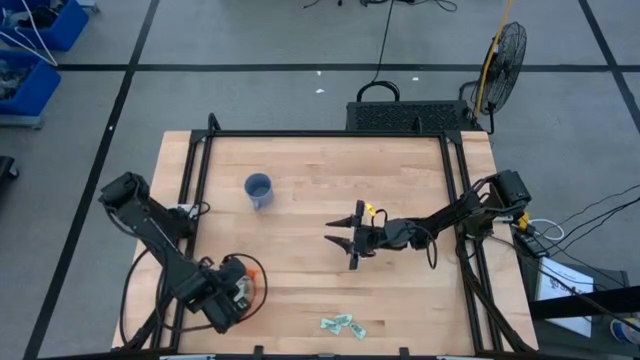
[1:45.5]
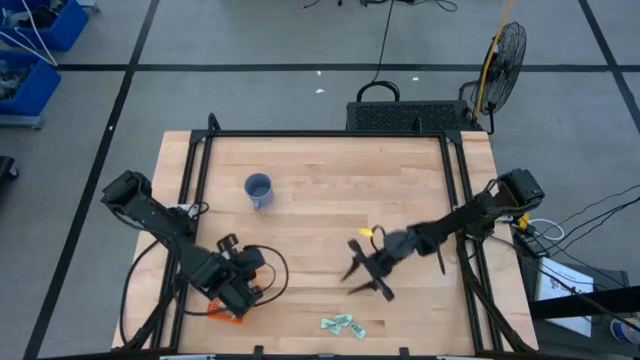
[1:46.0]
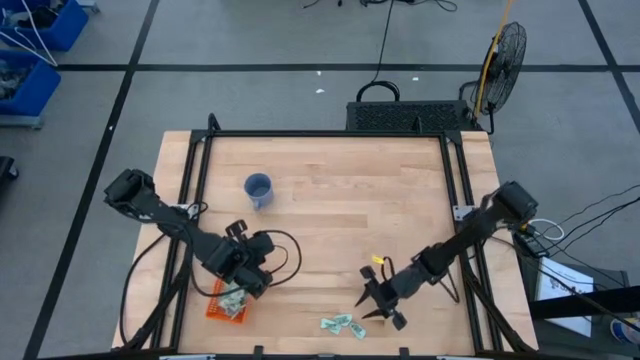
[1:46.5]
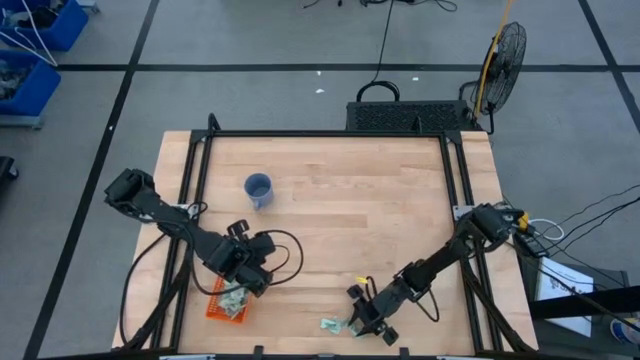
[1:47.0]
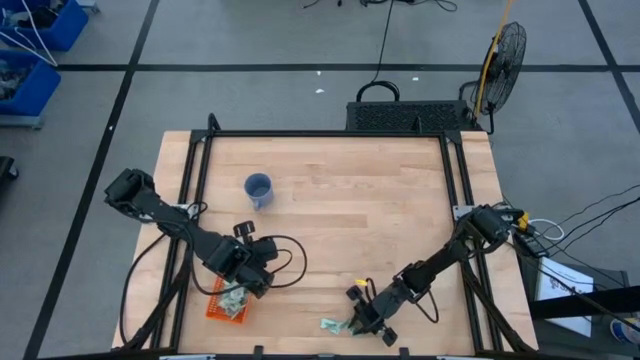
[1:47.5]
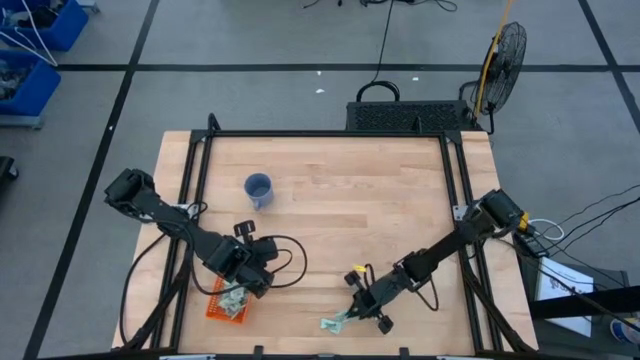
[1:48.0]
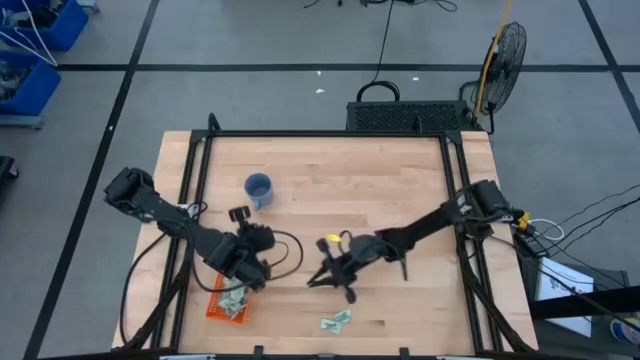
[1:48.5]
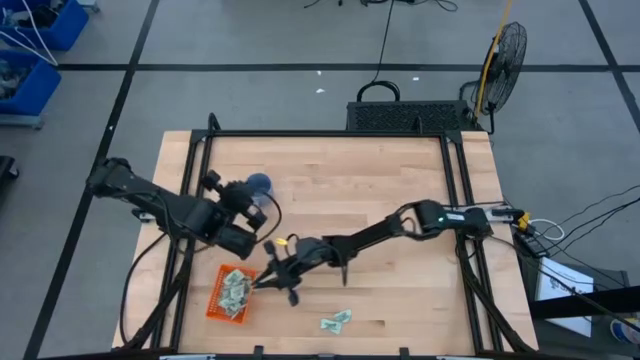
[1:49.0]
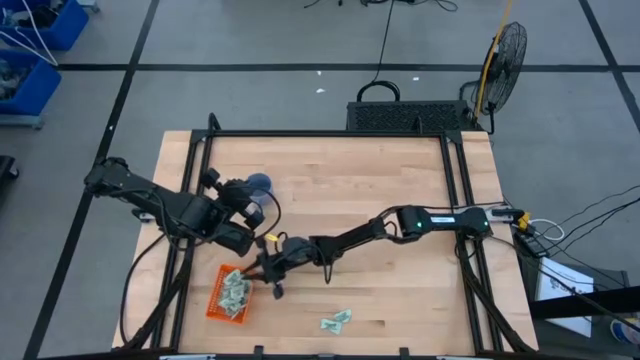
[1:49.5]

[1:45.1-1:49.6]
Task: Pick and place Stevia / Truvia into bins
Put the stevia packet into the orange bin

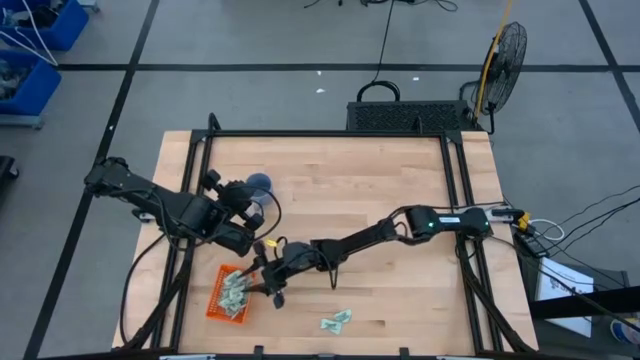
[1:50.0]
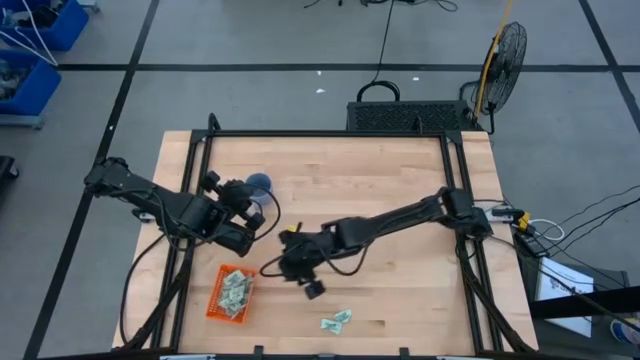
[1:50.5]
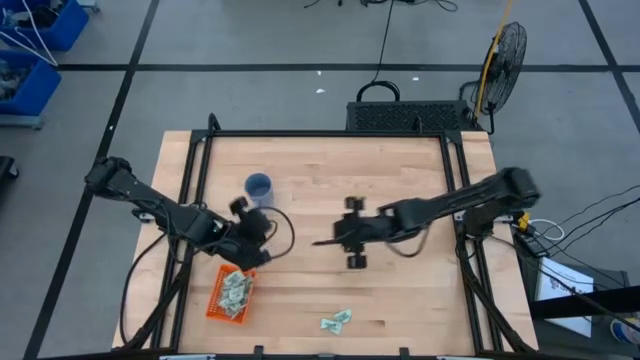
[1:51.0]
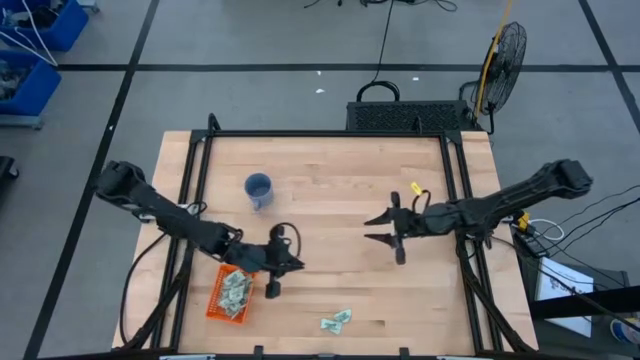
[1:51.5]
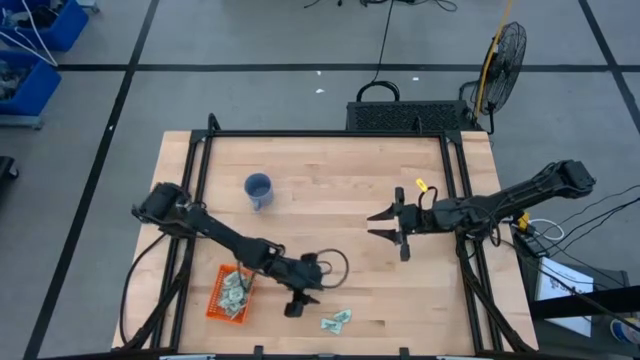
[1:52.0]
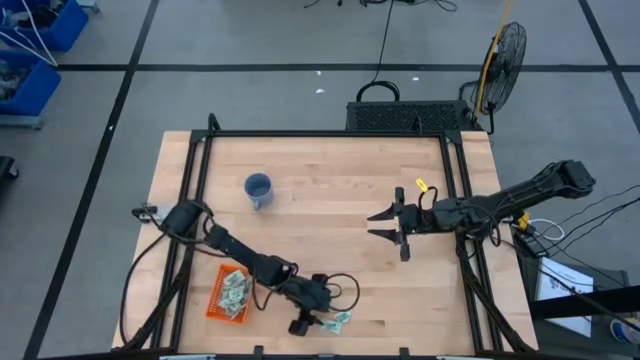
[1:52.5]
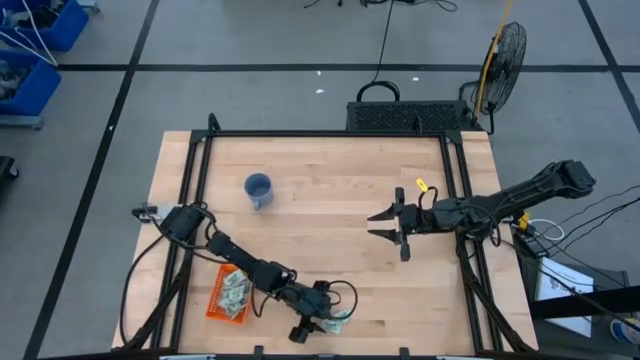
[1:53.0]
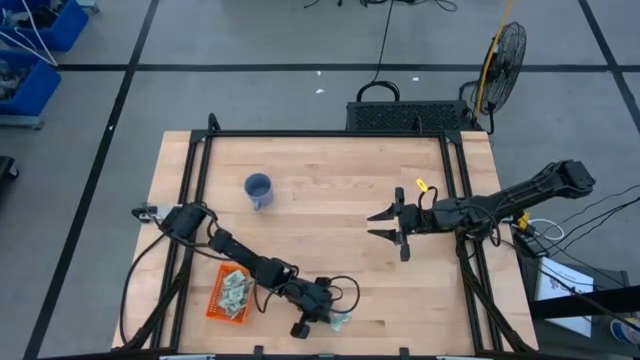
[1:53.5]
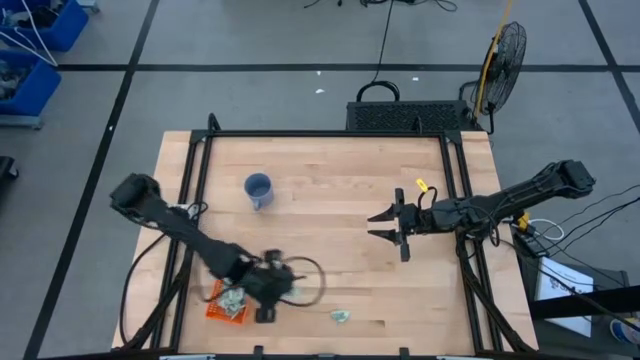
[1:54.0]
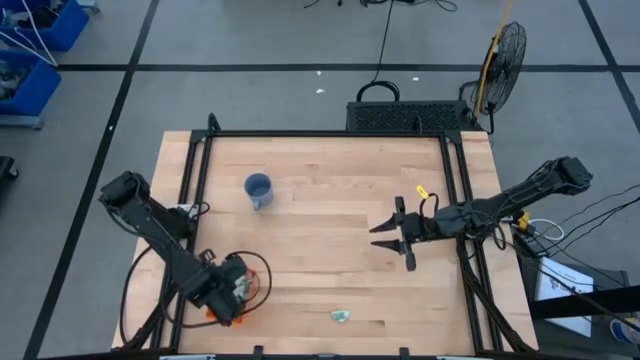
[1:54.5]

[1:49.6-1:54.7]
Put the stevia packet into the orange bin

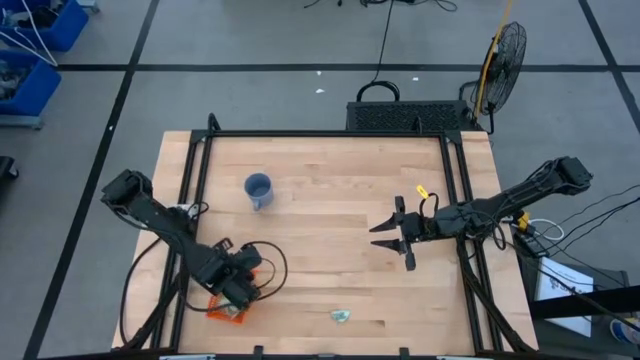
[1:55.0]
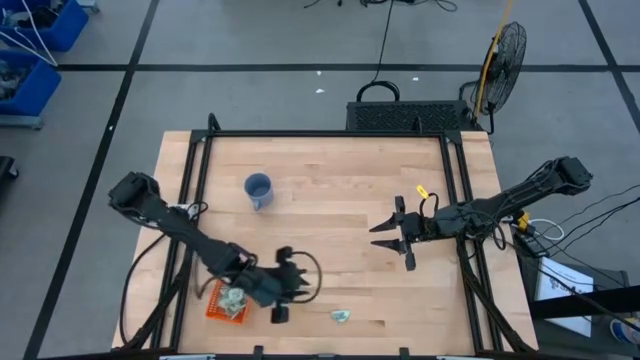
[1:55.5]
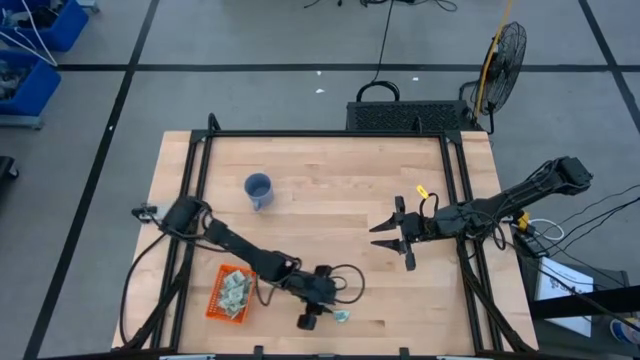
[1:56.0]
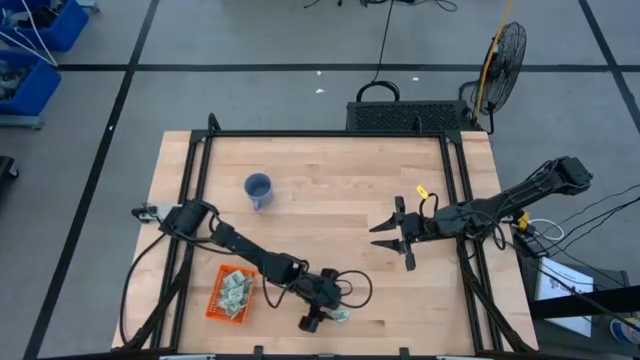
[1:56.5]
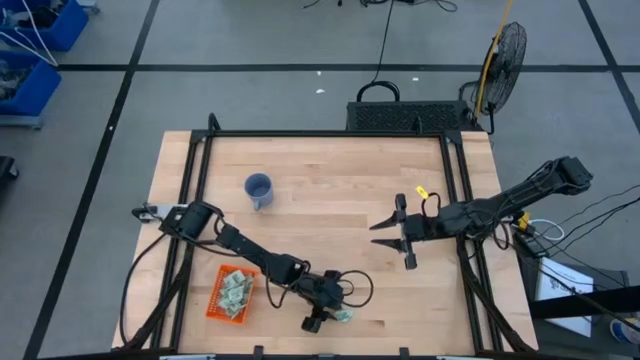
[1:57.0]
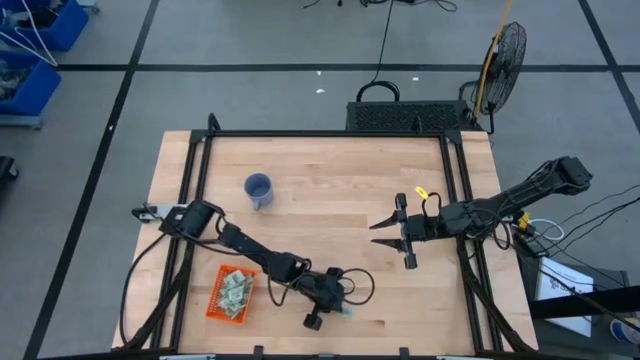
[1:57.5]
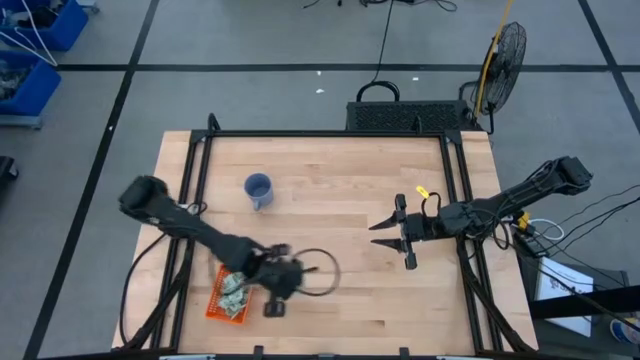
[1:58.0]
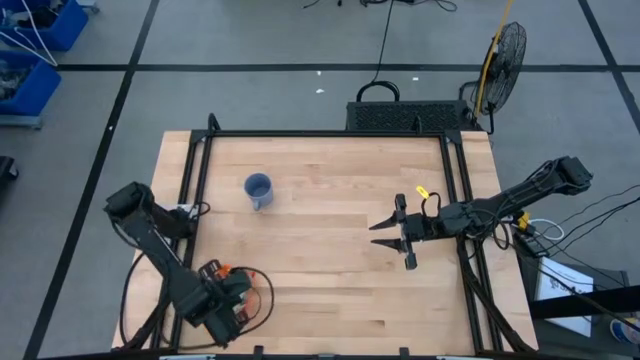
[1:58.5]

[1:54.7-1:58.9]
Put the stevia packet into the orange bin

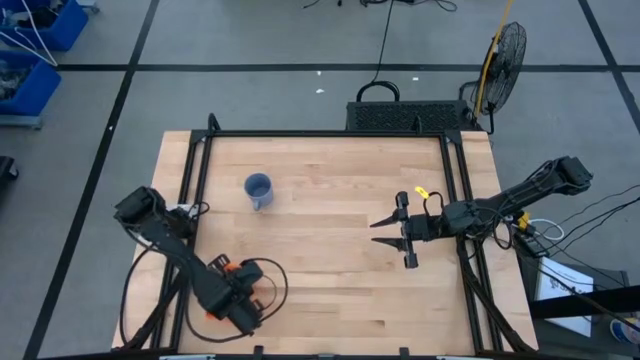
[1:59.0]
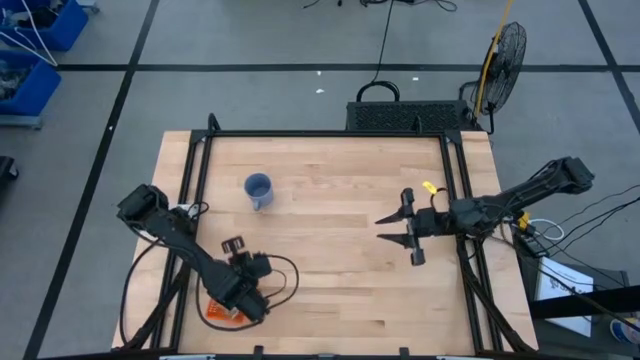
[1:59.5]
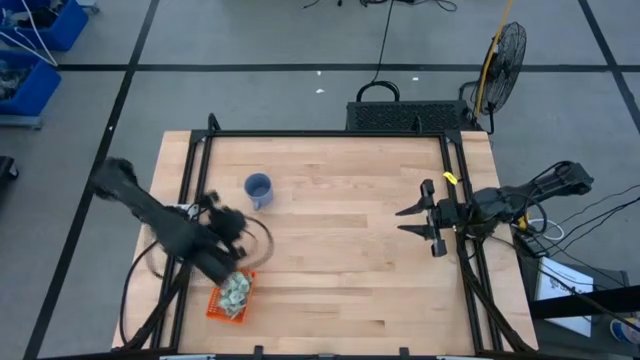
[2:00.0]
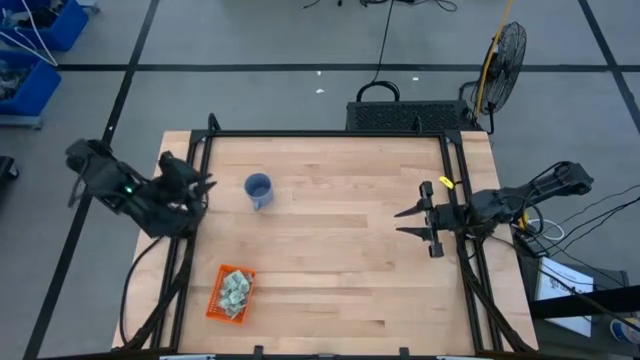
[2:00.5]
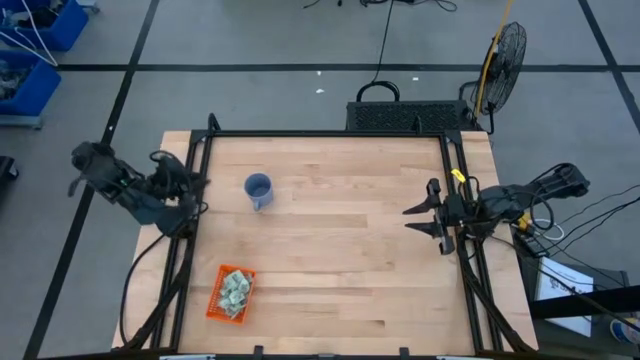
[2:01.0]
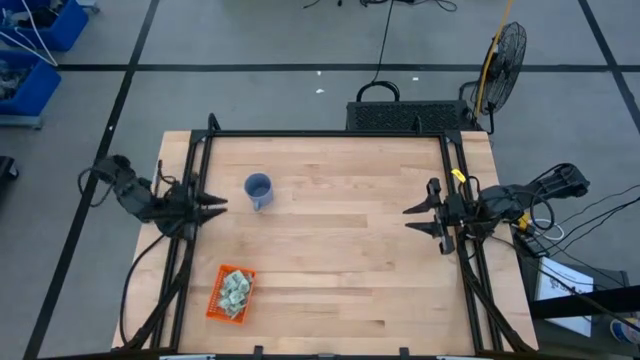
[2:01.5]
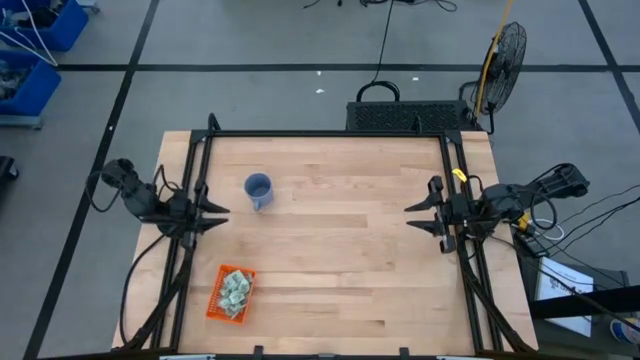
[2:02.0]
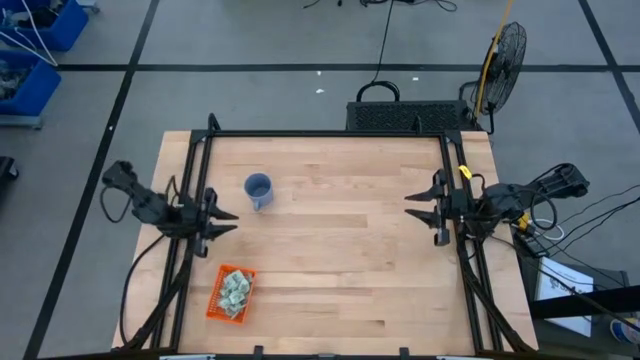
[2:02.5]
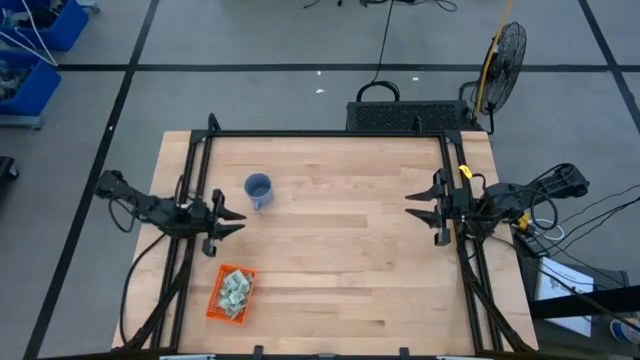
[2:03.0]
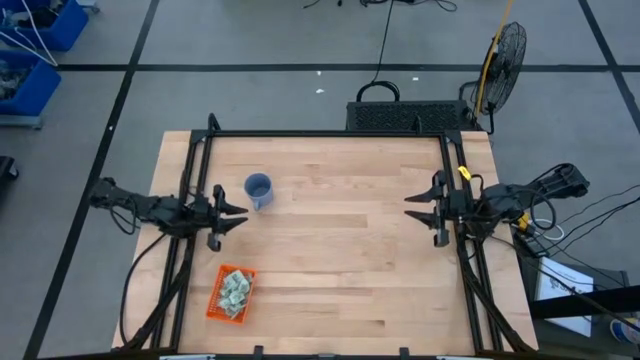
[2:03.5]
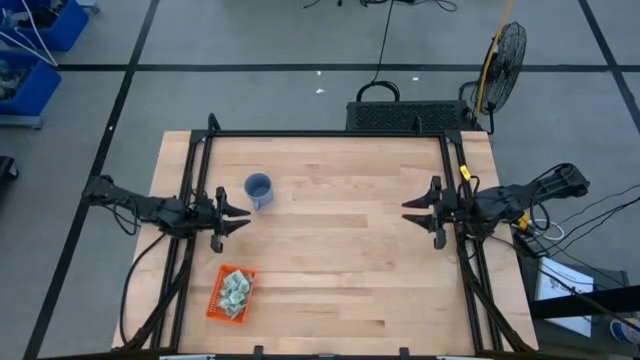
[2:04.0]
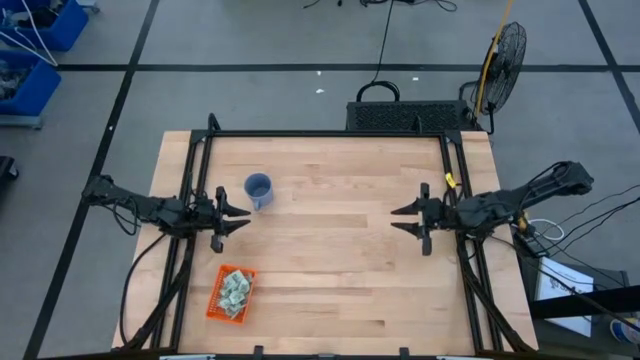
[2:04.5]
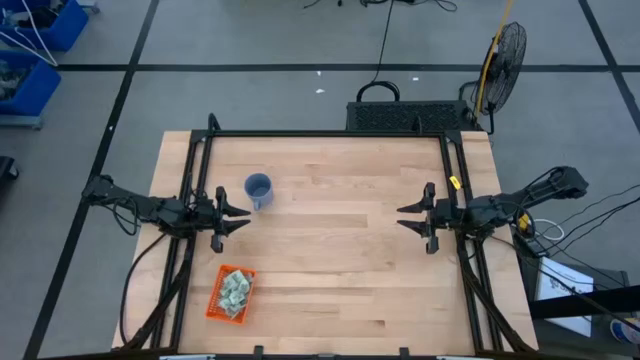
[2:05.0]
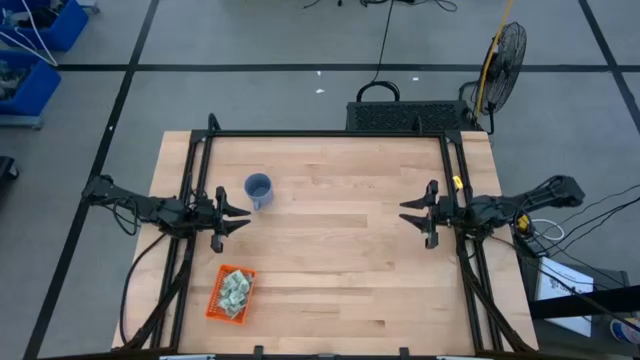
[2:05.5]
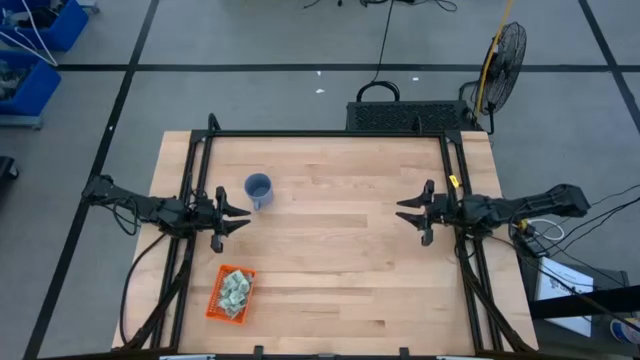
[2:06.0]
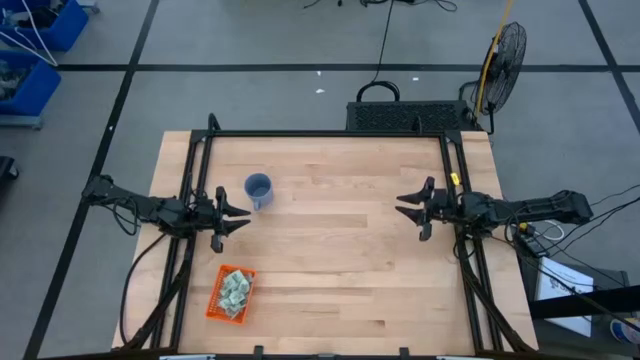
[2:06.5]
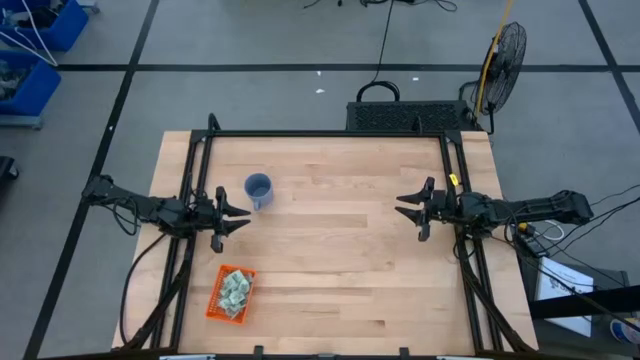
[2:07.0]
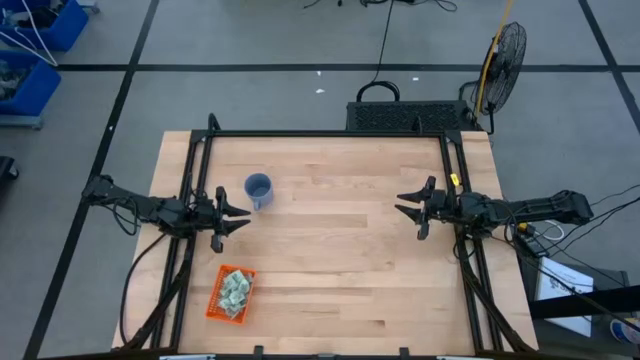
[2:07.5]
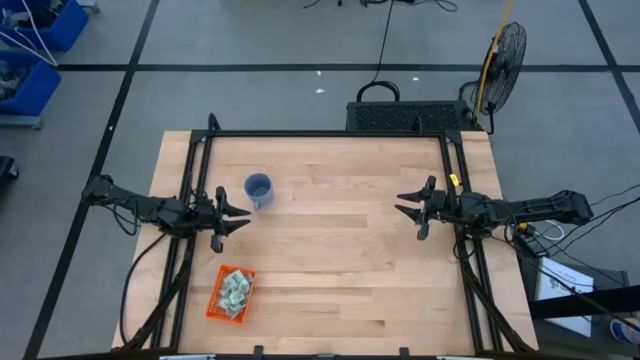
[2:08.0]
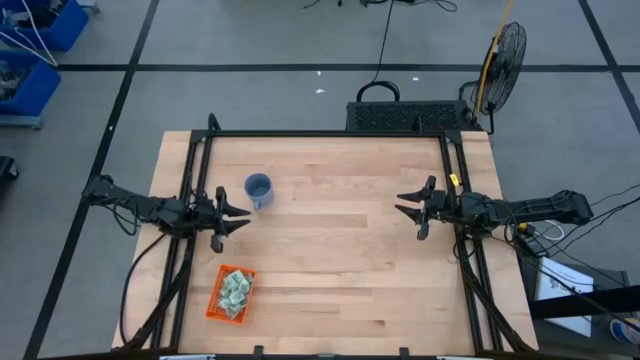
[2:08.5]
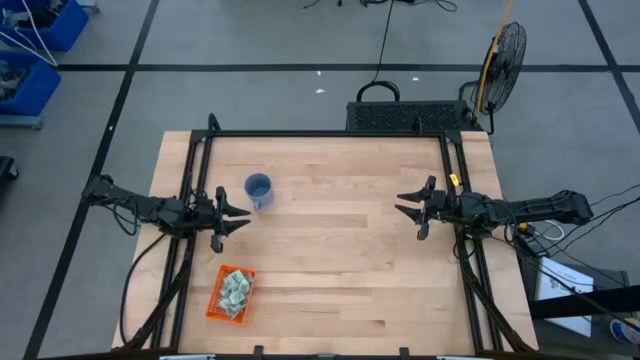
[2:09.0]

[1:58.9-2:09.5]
Return to Home Position
